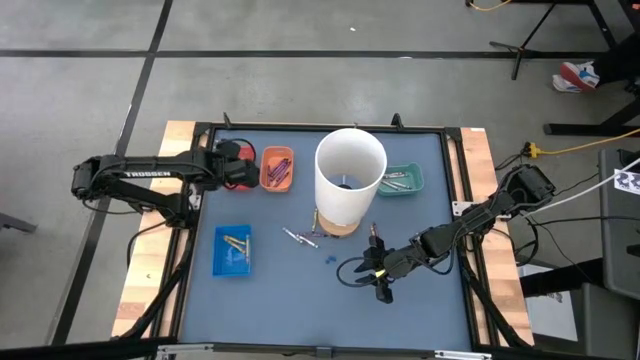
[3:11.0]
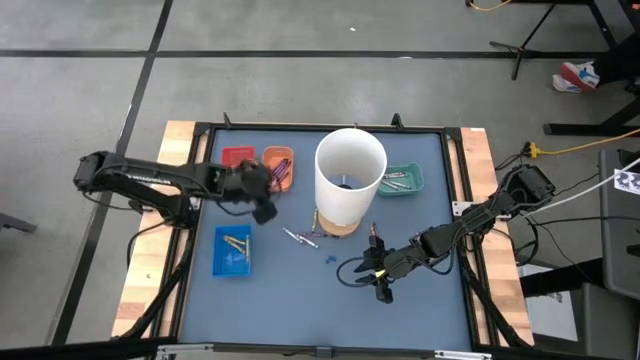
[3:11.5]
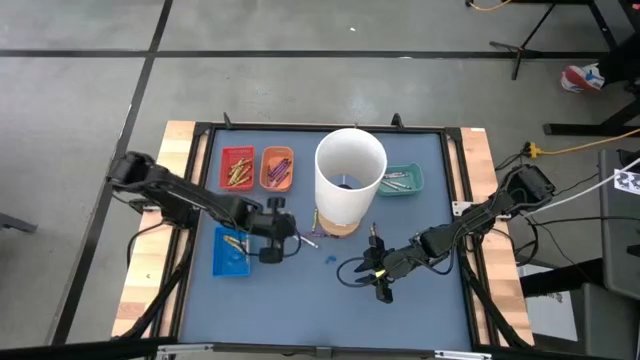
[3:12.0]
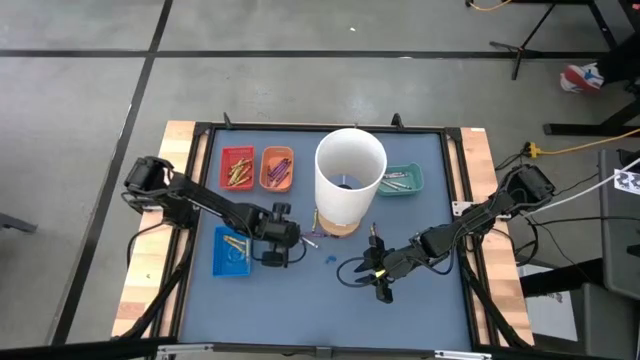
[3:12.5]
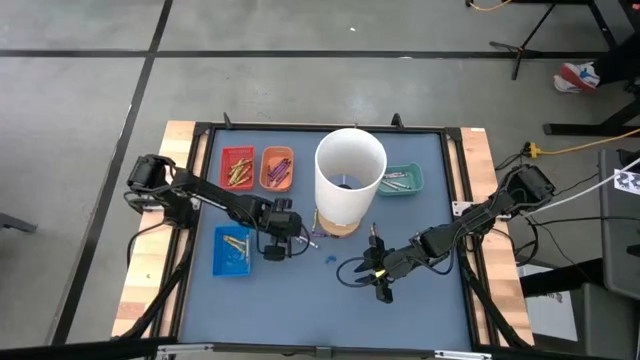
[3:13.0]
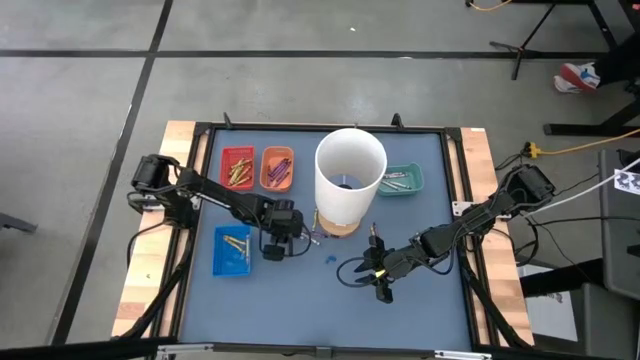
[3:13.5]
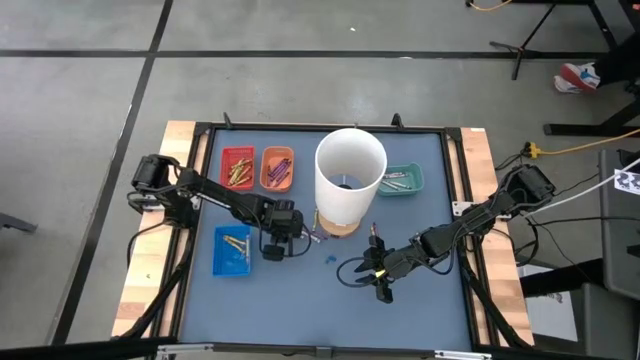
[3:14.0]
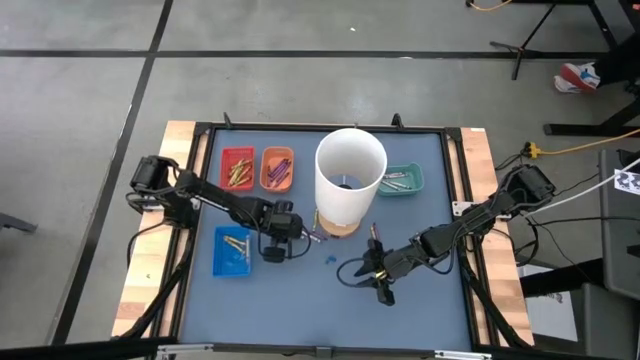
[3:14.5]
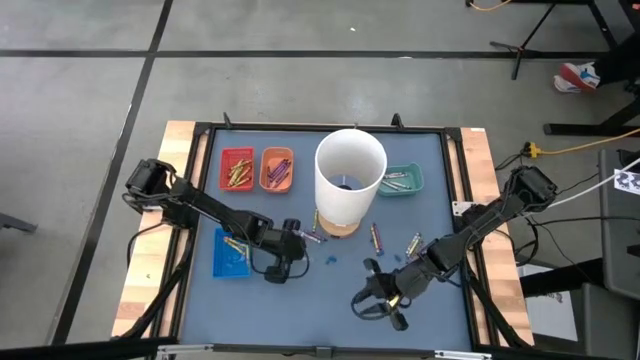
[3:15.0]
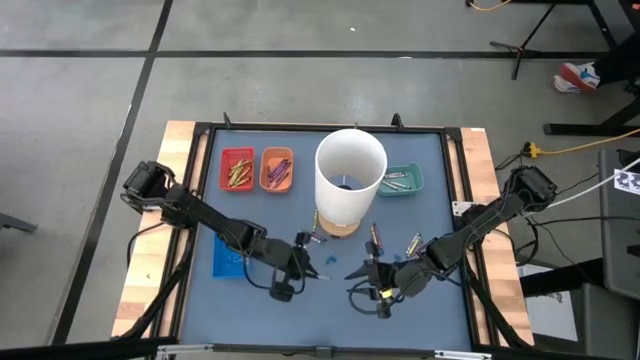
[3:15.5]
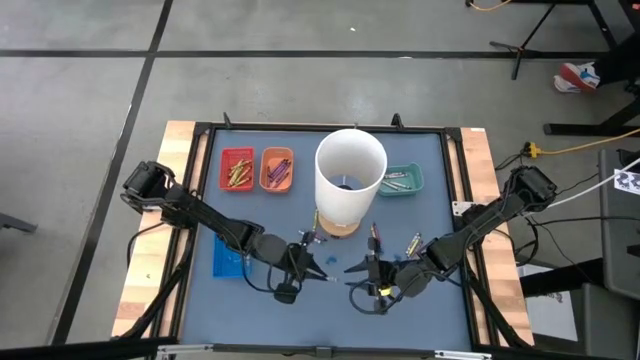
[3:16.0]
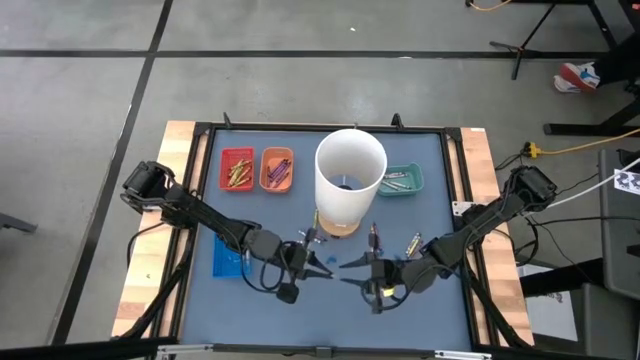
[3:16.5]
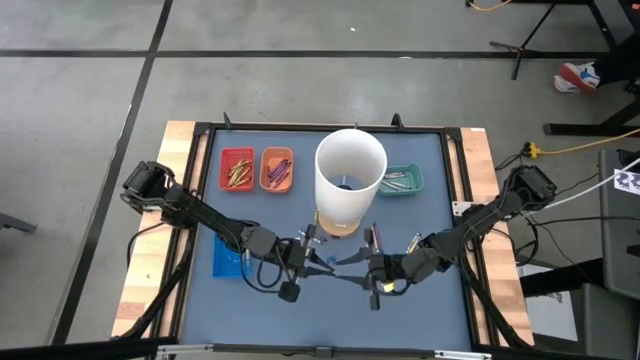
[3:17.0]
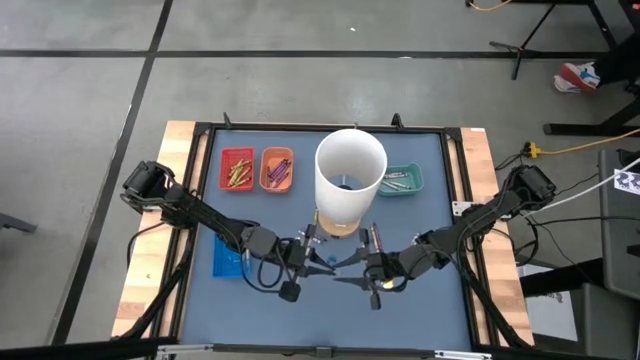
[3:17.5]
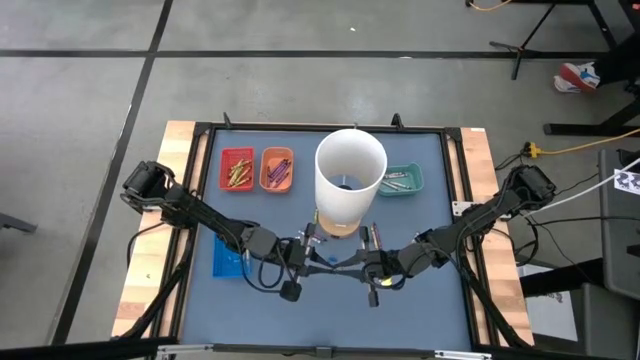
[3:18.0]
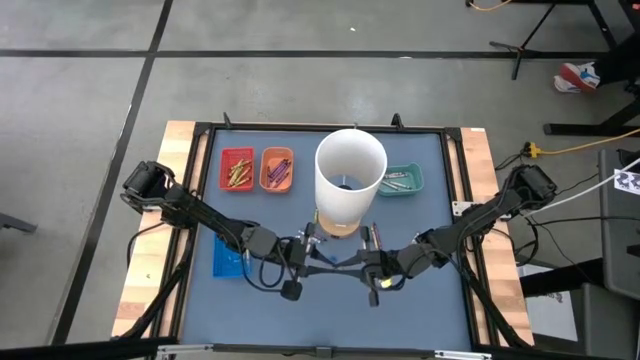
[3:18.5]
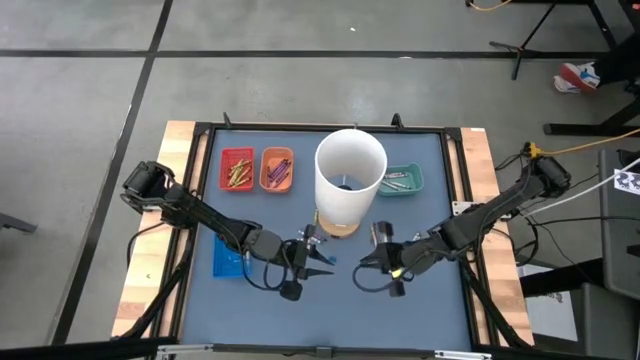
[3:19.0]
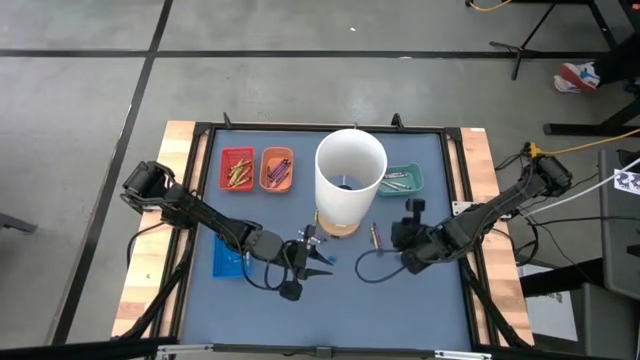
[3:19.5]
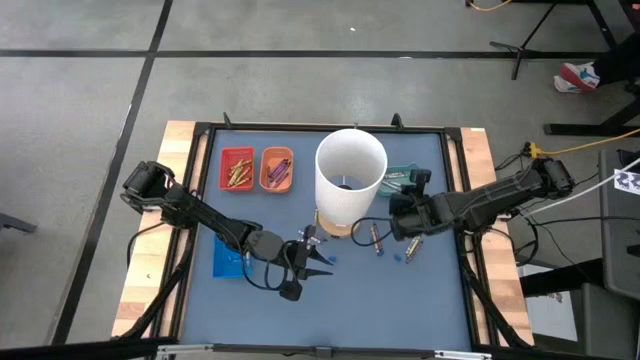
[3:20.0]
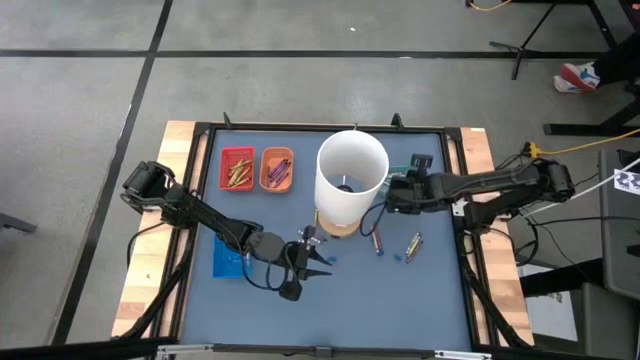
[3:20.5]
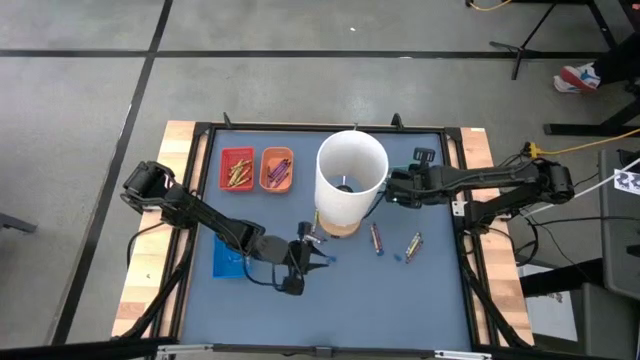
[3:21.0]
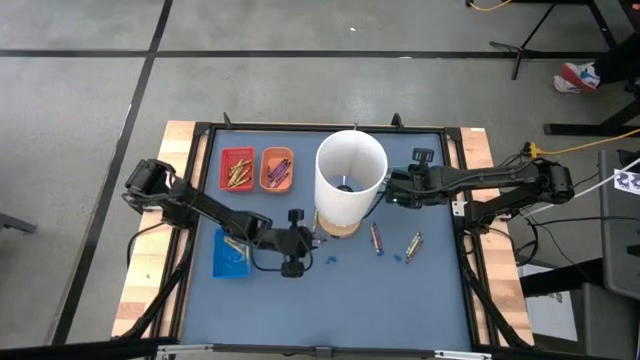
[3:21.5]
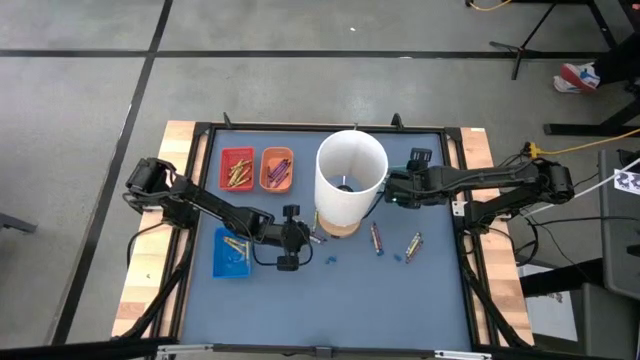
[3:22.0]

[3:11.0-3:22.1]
Task: Sort crayons
Put the gray crayon into the green bin

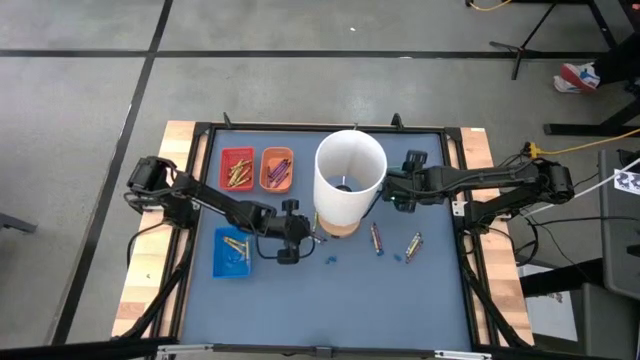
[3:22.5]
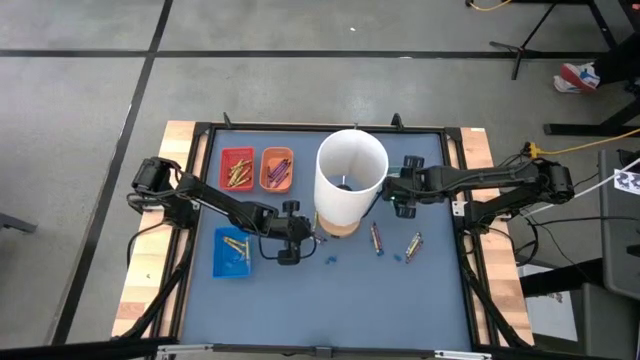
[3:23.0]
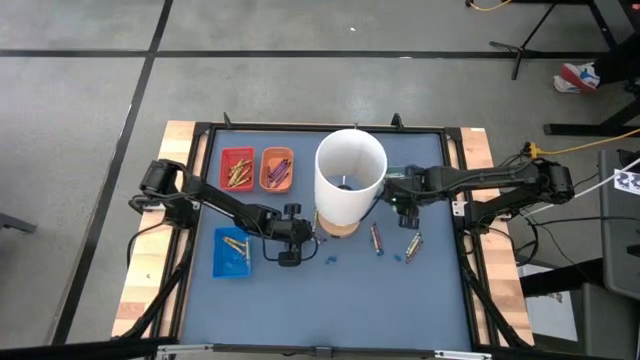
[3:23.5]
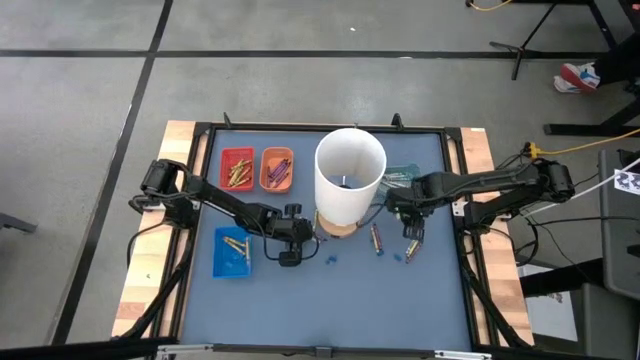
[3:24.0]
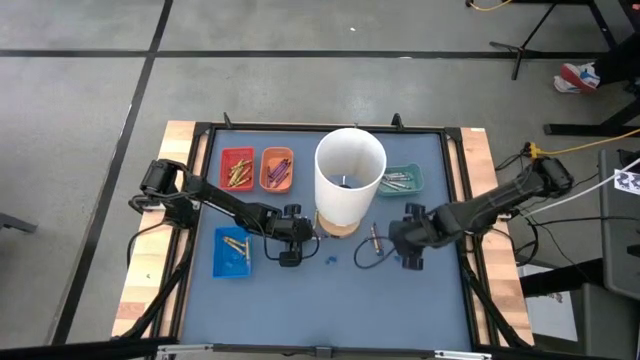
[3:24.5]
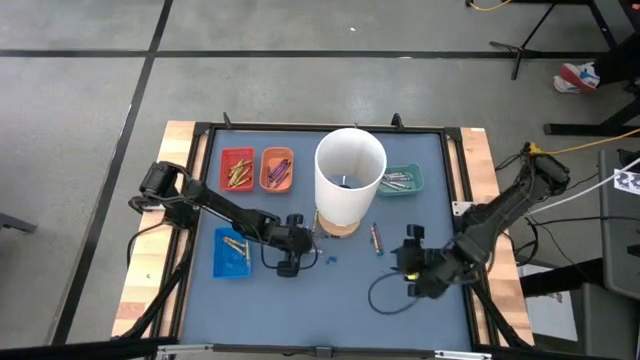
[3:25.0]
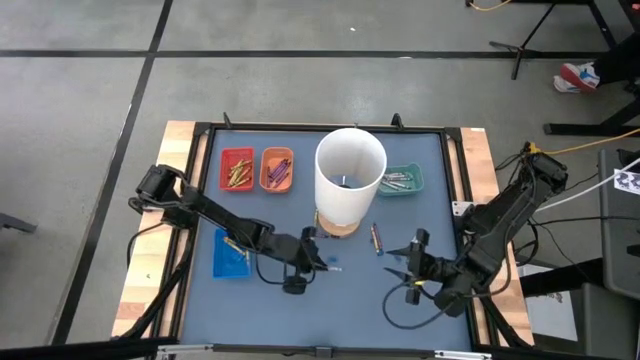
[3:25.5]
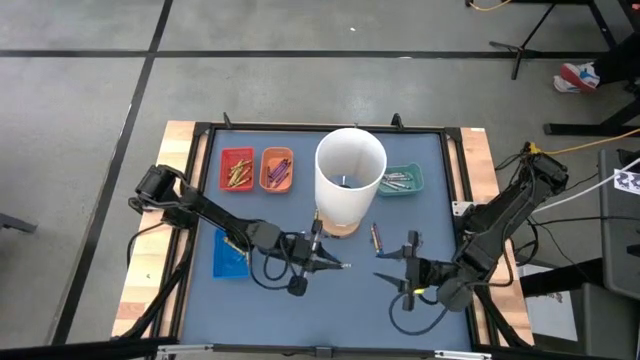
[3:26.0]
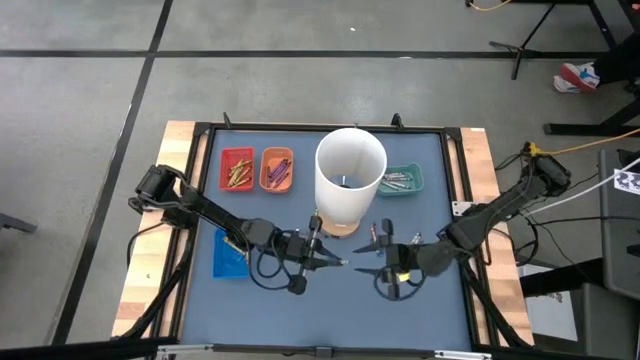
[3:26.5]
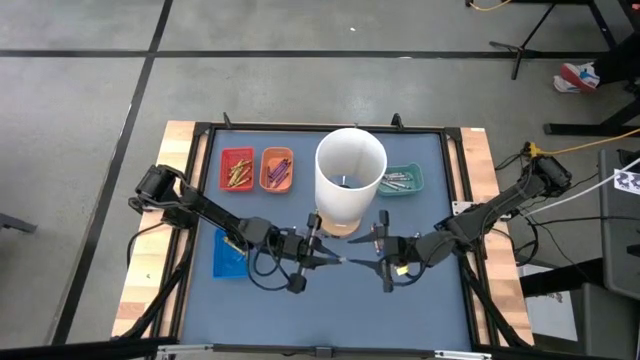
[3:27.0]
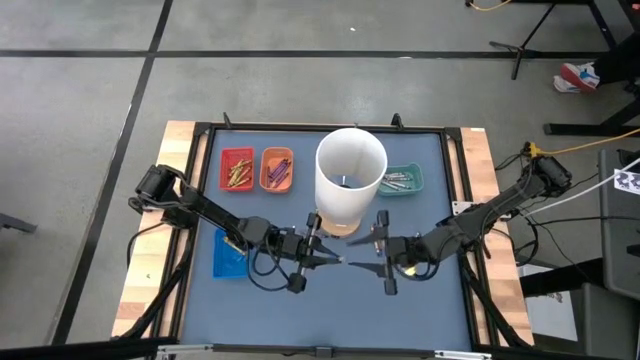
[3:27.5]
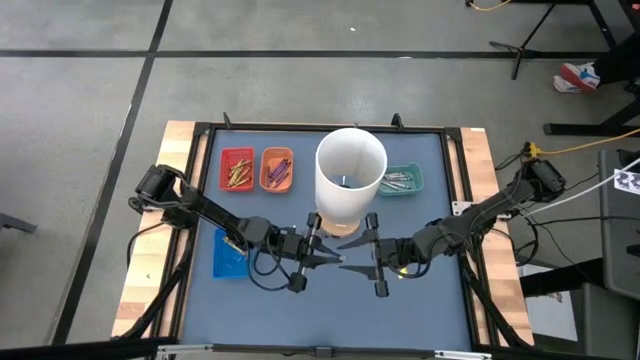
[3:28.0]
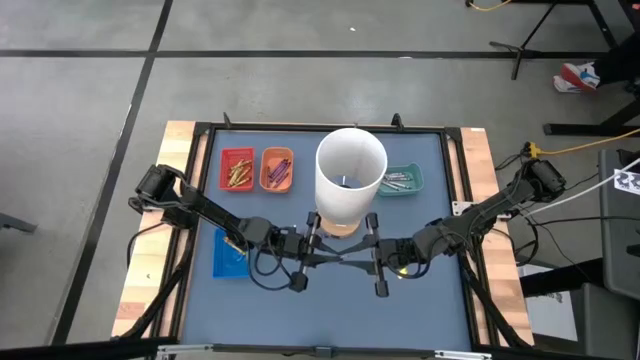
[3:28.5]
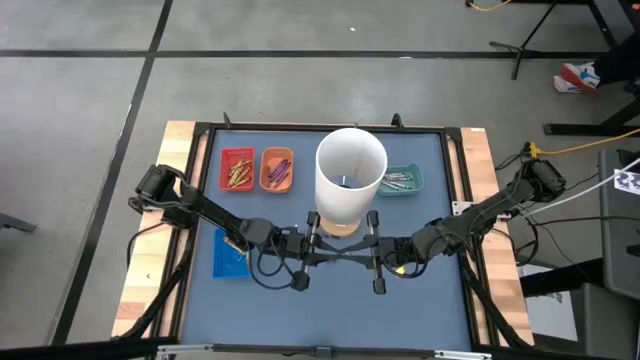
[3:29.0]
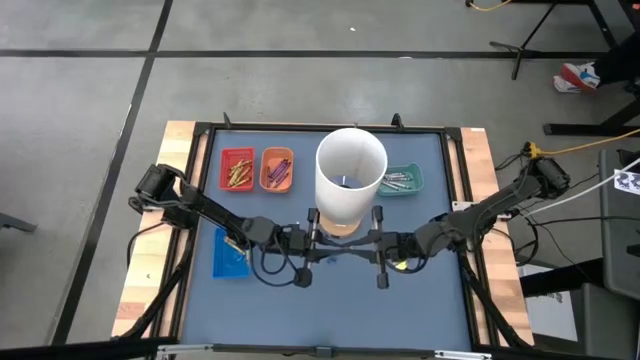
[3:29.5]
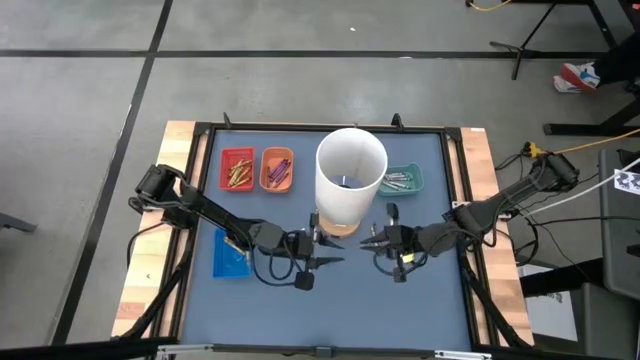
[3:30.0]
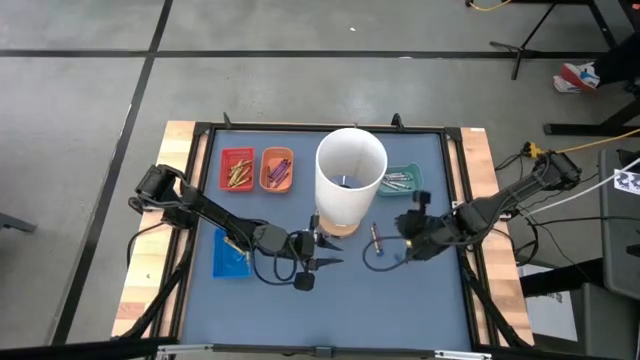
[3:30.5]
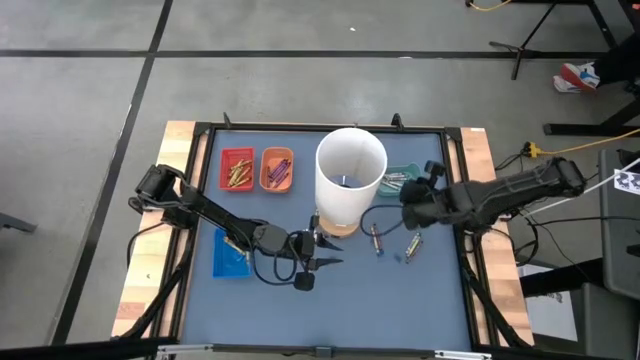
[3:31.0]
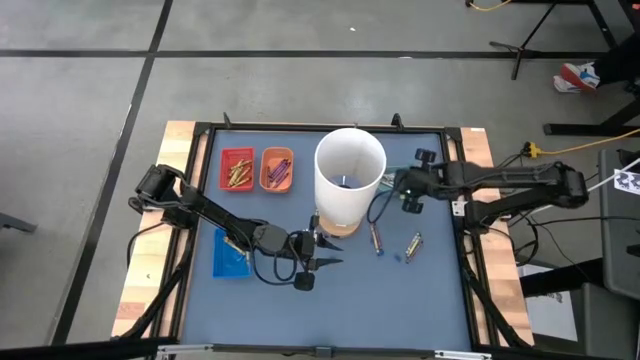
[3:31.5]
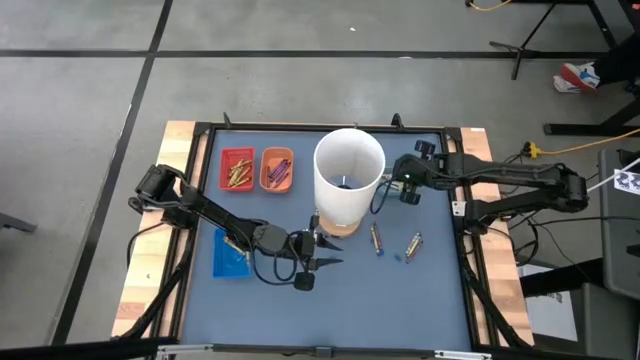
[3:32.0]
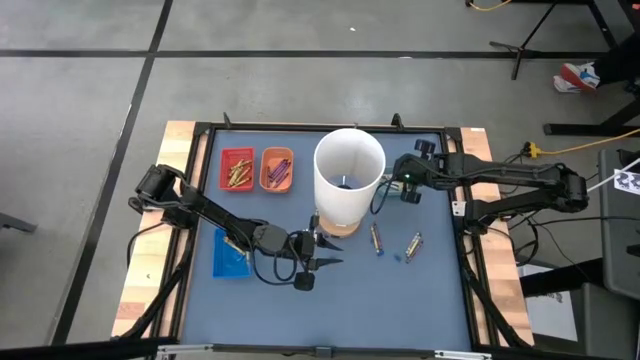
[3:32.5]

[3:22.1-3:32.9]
Put the gray crayon into the green bin
